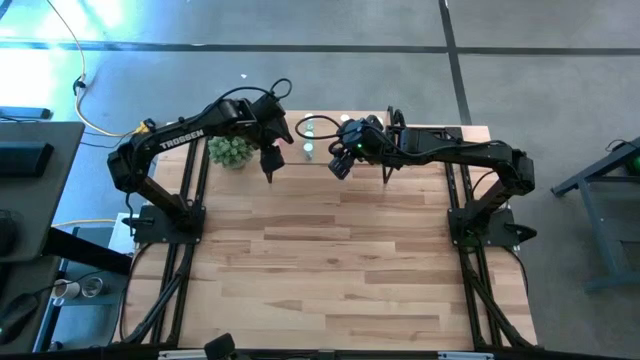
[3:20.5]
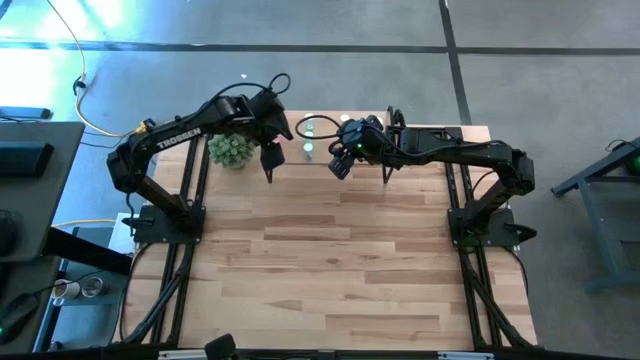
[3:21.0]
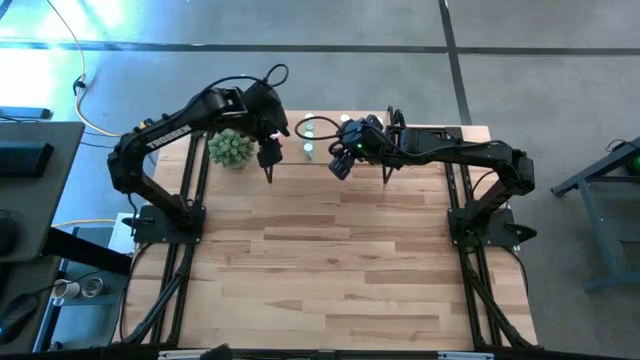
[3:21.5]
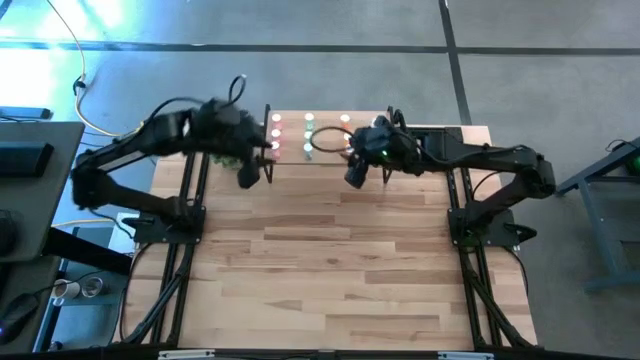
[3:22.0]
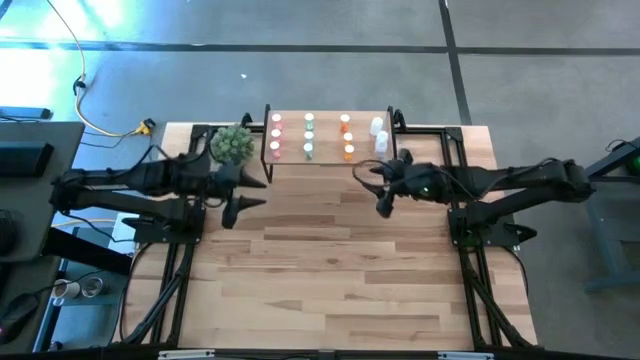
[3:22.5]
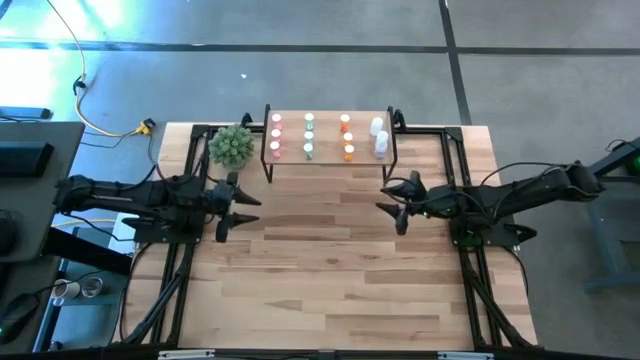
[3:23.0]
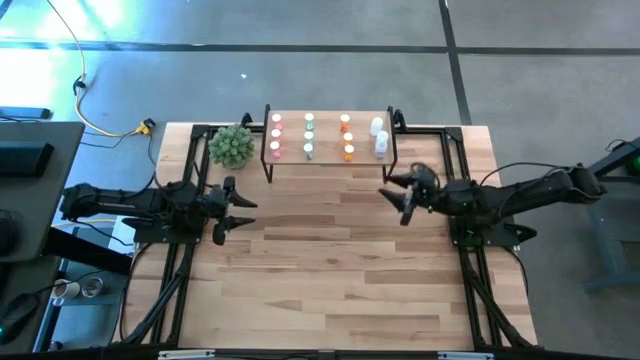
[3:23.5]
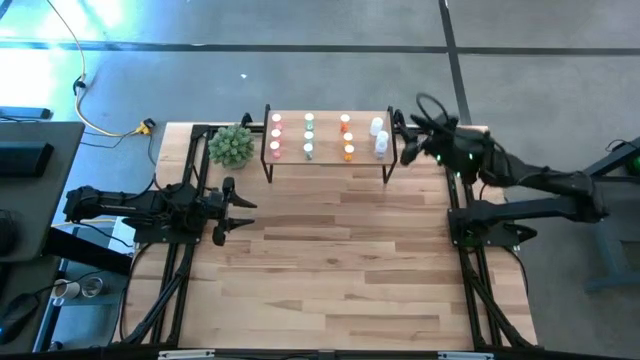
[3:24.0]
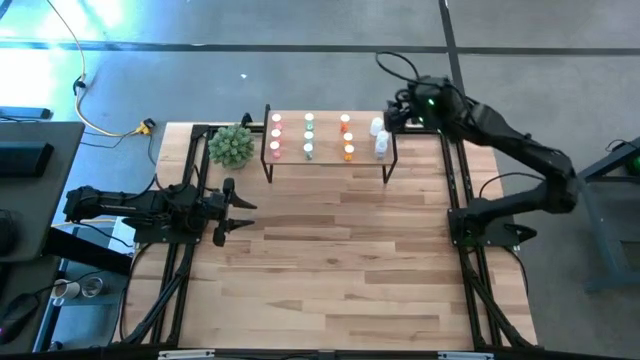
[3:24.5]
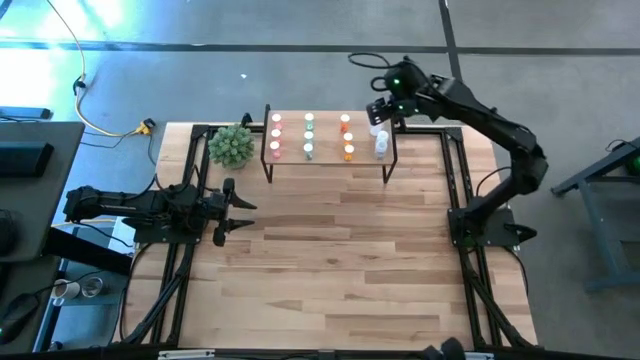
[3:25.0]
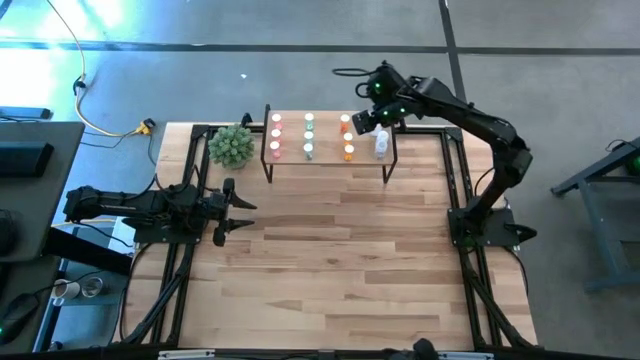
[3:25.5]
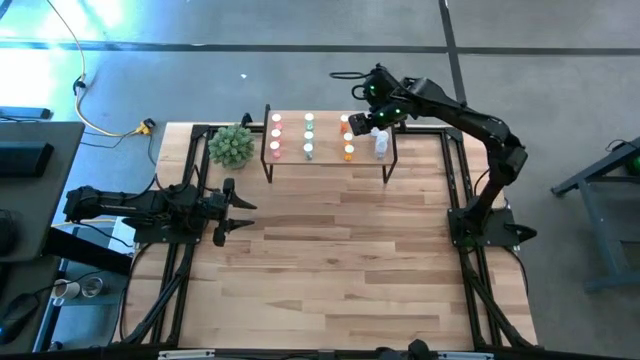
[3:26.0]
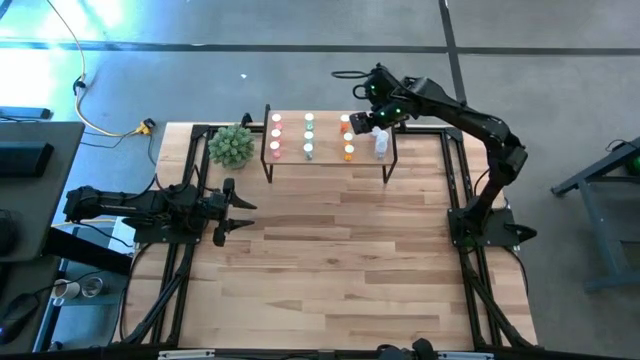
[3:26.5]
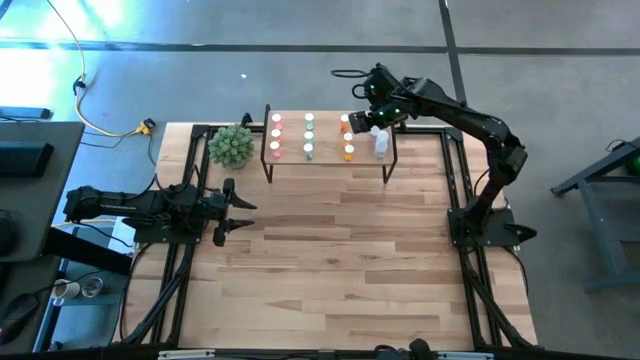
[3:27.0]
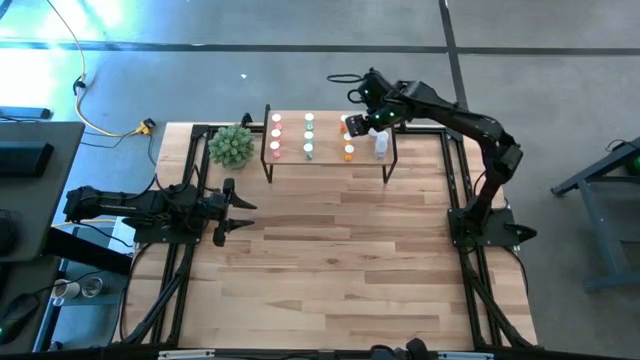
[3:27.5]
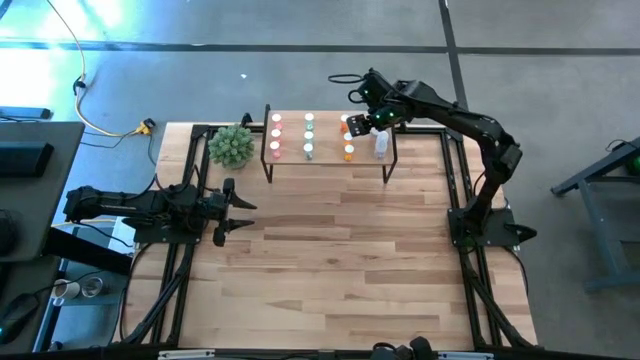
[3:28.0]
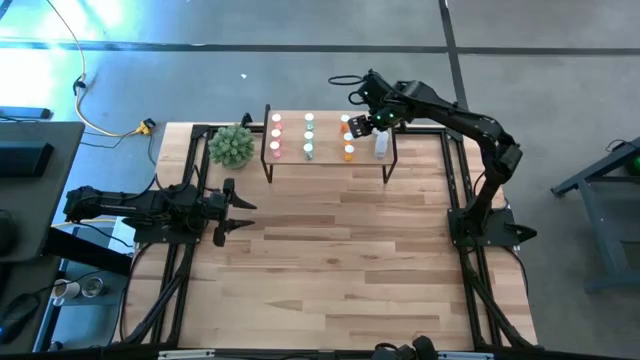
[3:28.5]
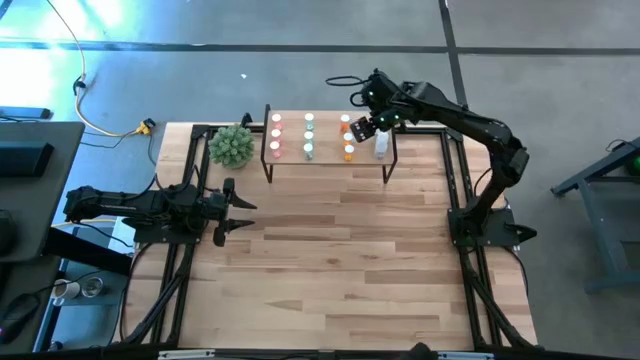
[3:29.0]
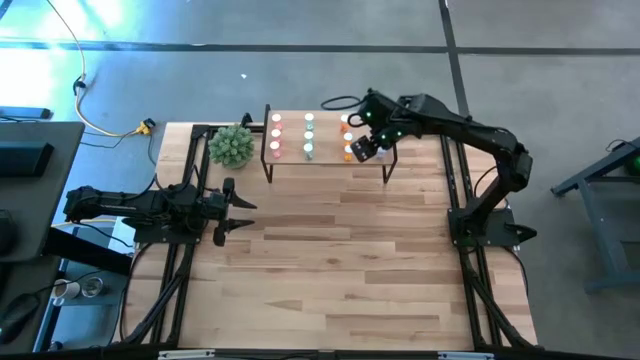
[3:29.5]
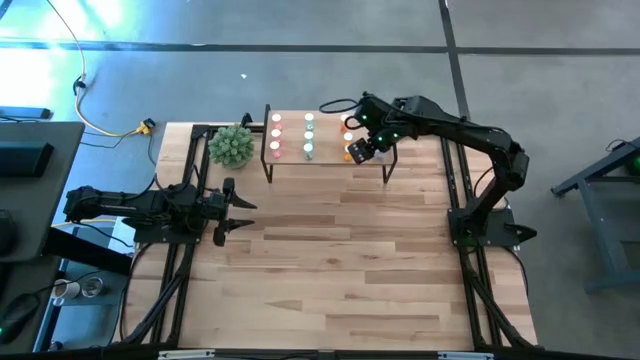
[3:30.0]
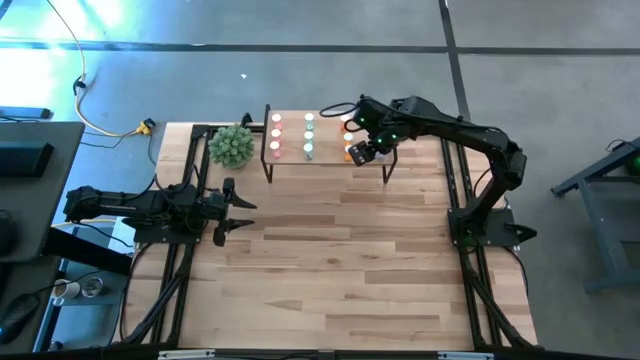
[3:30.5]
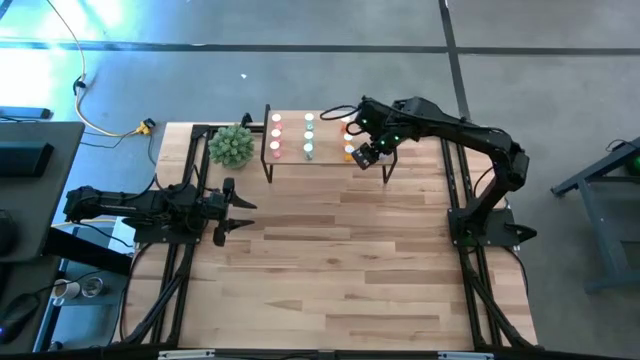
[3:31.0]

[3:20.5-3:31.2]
Task: Pick and place medicine bottles onto shelf by color
Adjust the white pill bottles

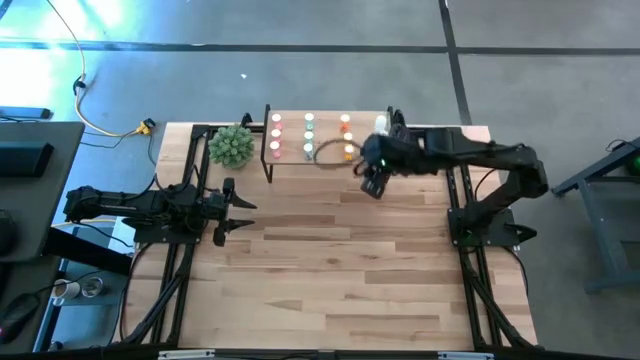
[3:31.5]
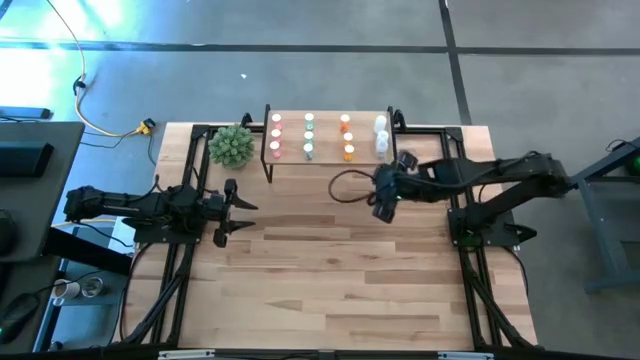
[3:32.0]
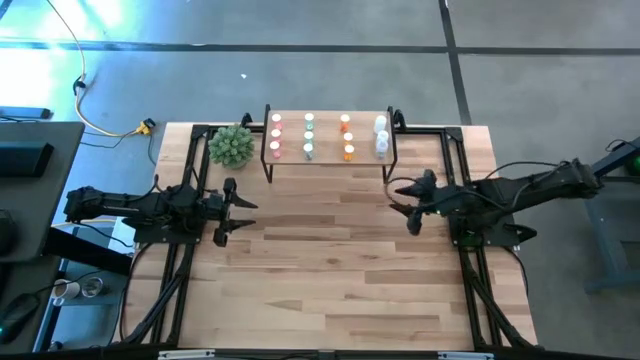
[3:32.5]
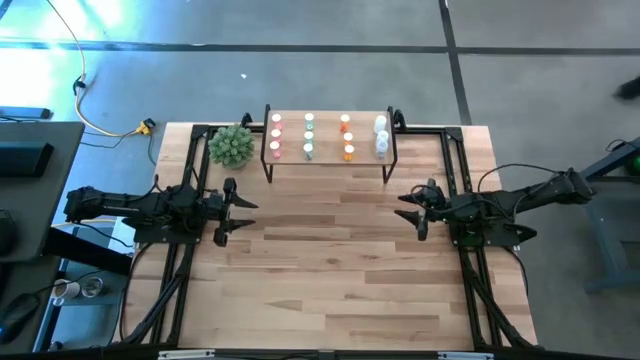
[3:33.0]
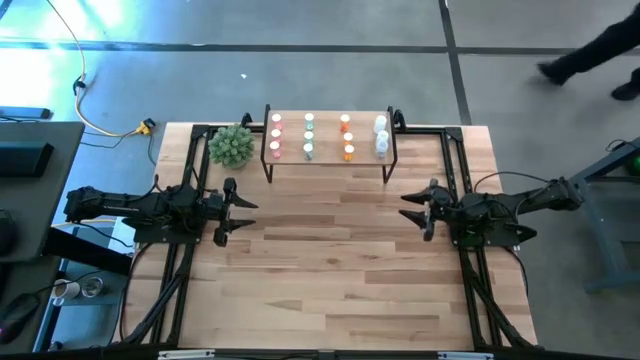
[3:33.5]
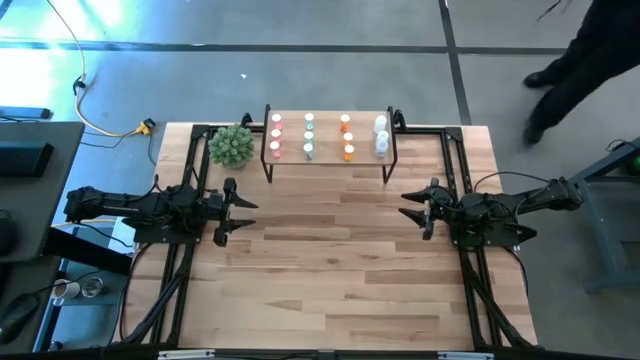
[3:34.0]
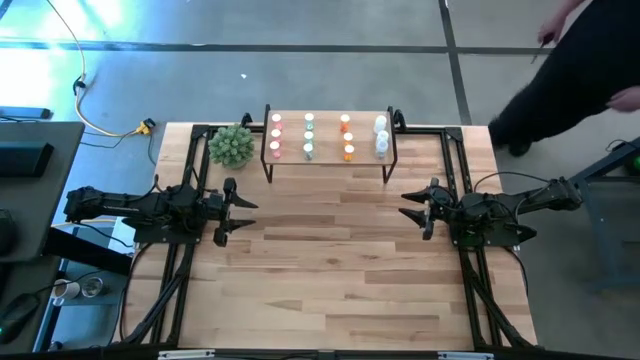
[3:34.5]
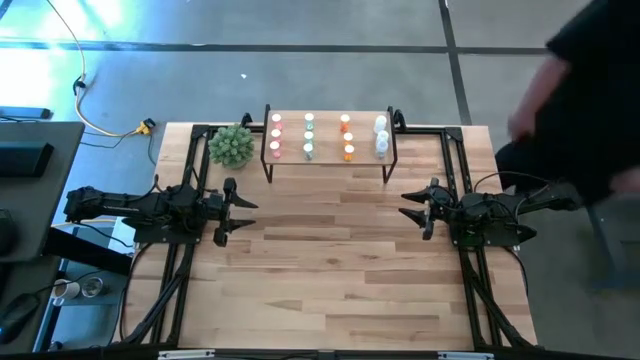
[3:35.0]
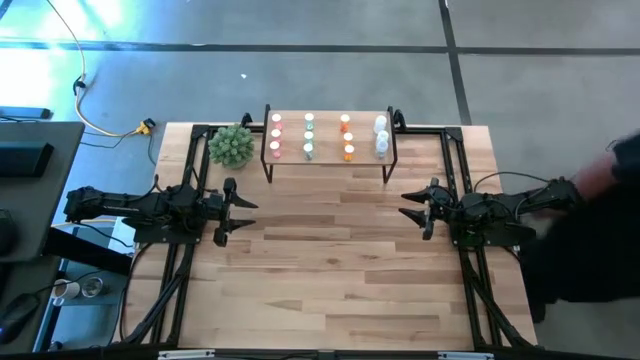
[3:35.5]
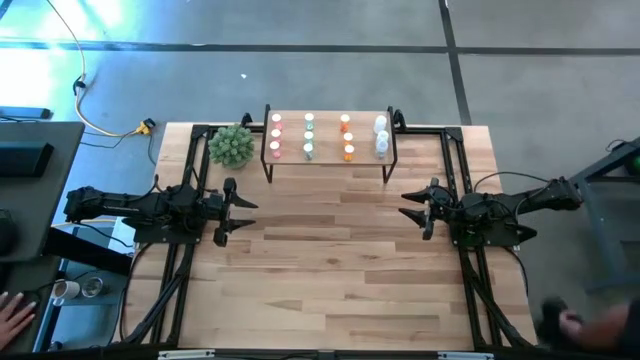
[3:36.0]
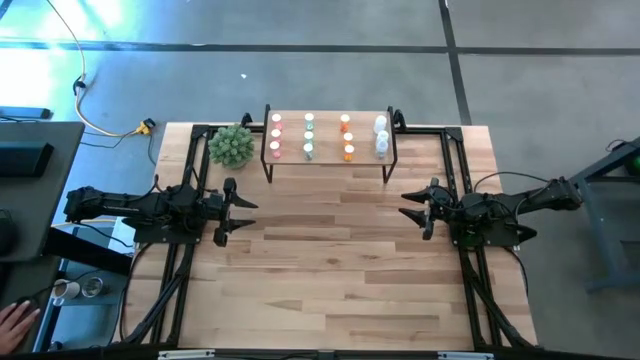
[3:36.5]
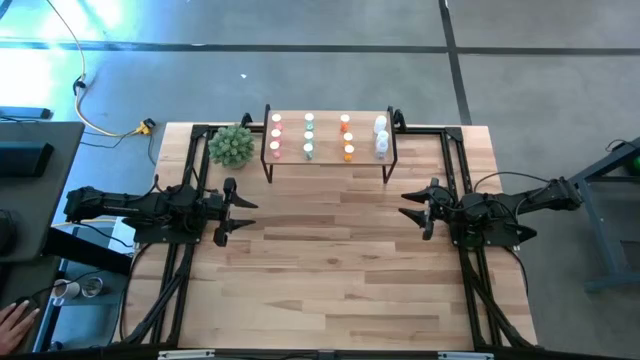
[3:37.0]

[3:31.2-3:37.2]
Return to Home Position

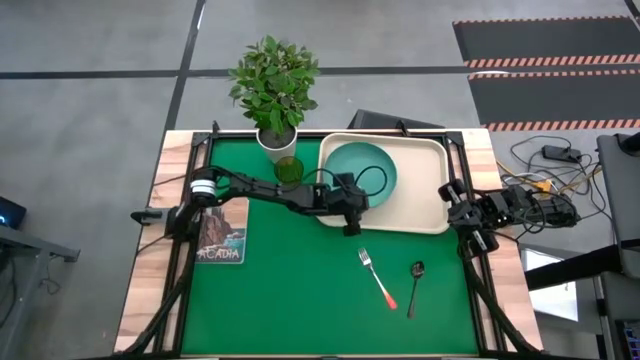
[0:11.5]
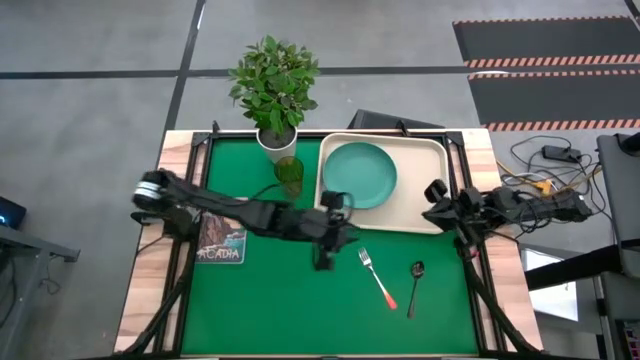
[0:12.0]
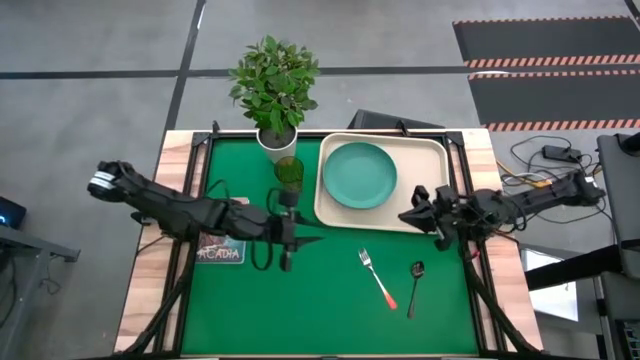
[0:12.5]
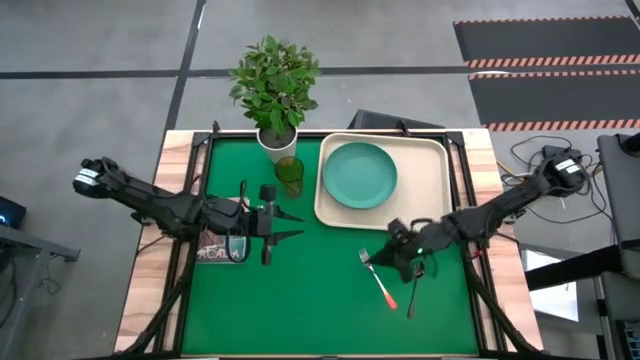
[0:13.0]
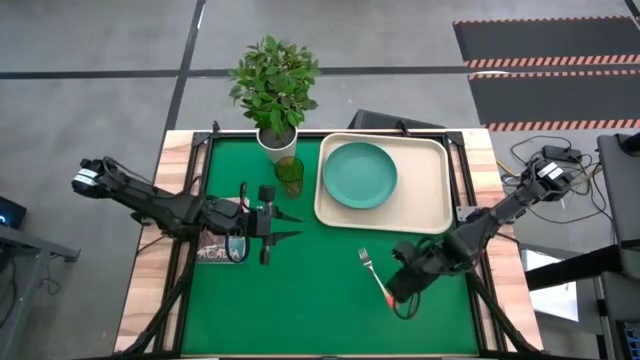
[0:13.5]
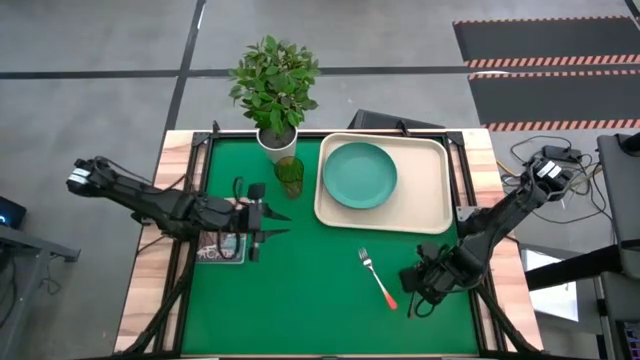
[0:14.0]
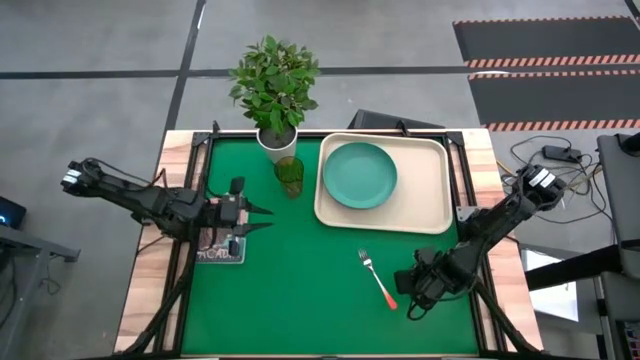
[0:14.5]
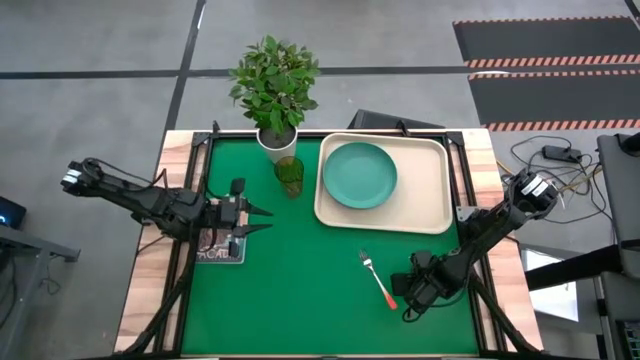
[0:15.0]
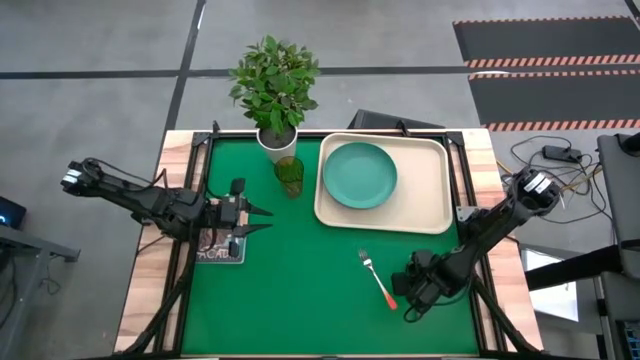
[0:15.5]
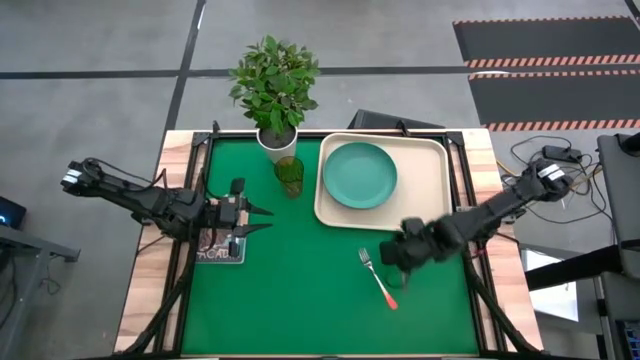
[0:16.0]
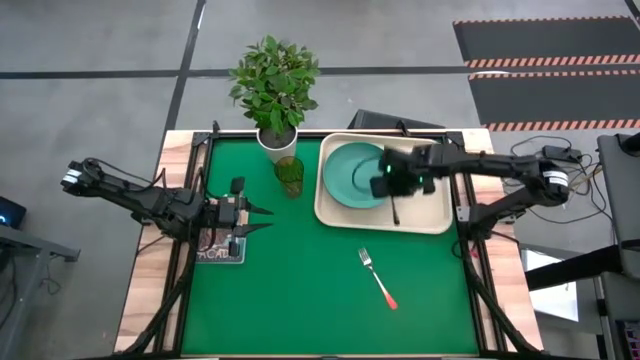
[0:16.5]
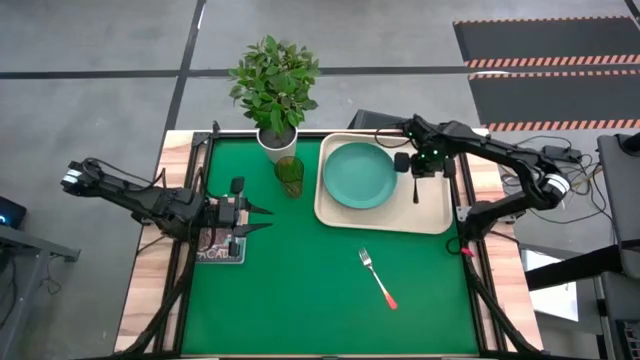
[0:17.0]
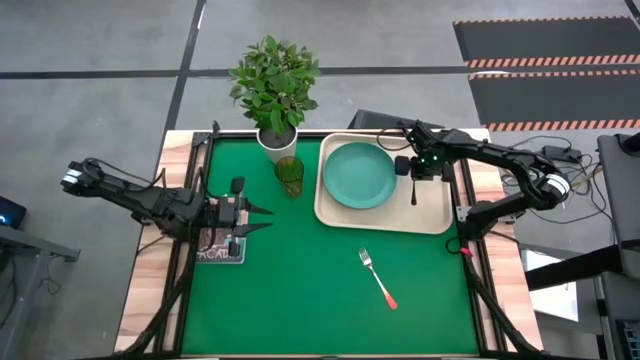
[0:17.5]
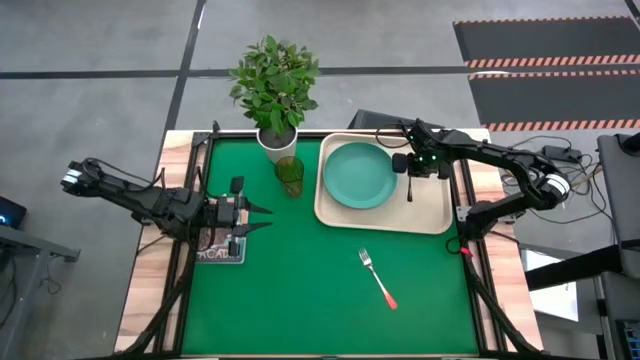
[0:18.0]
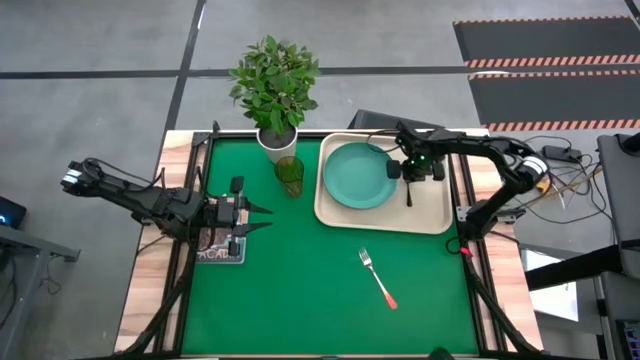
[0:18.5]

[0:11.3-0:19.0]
Task: Pick and place plate/cup/fork/spoon on tray
Put the black spoon to the right of the green plate on the white tray
